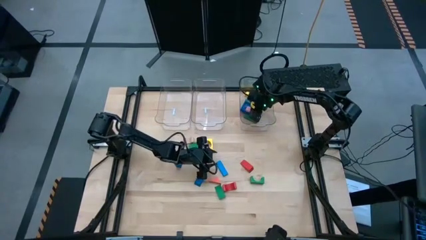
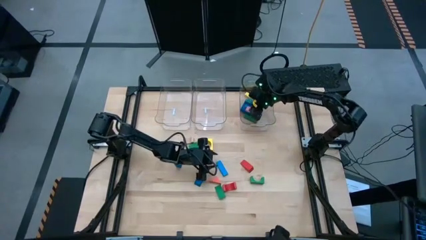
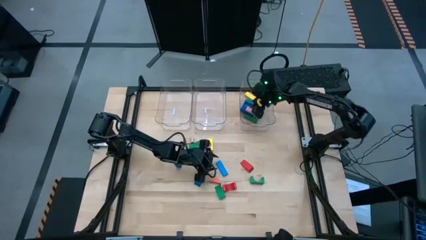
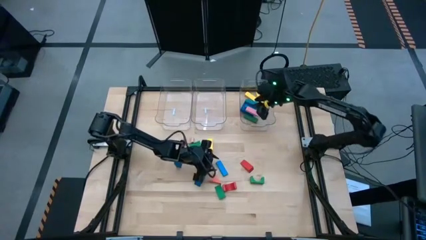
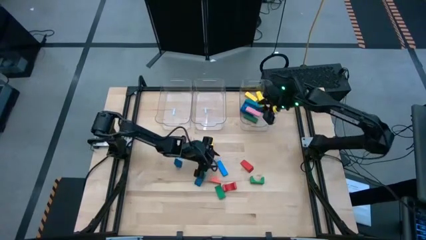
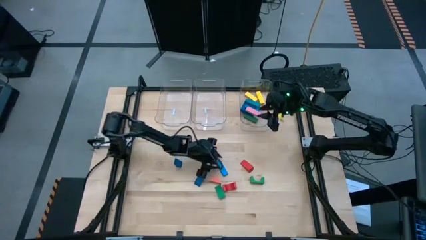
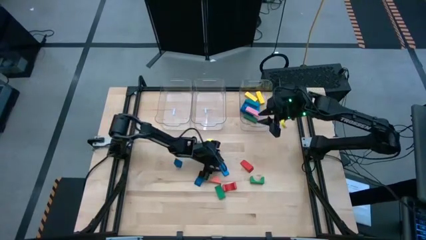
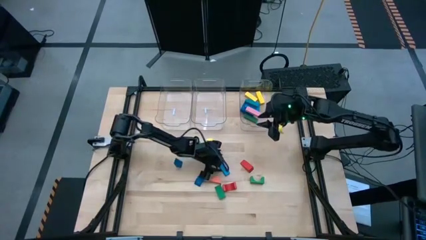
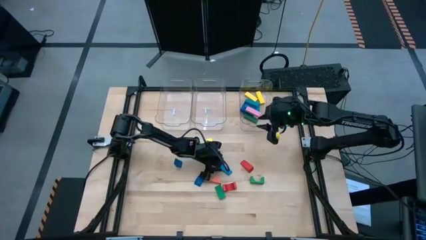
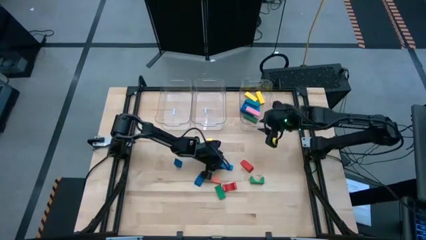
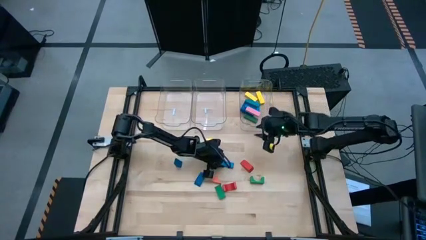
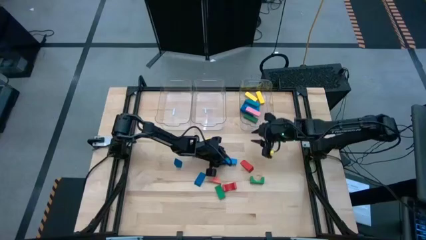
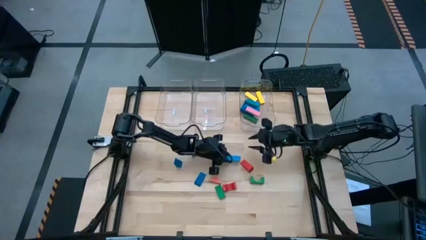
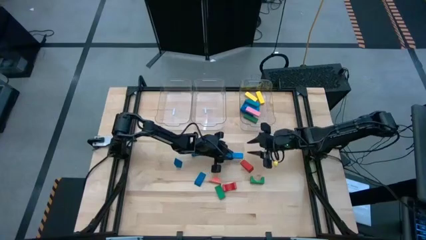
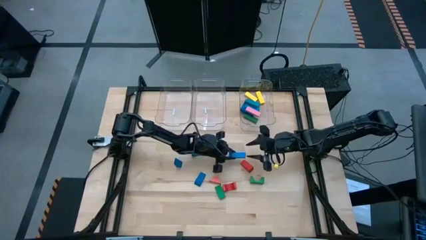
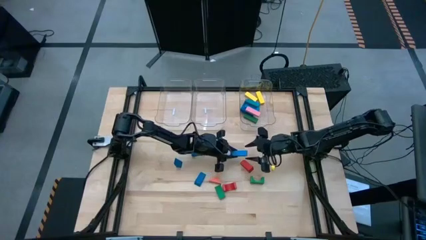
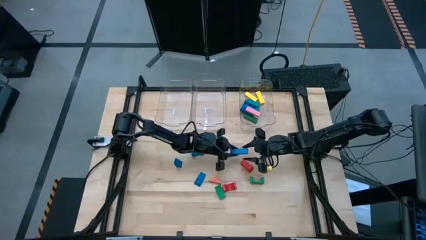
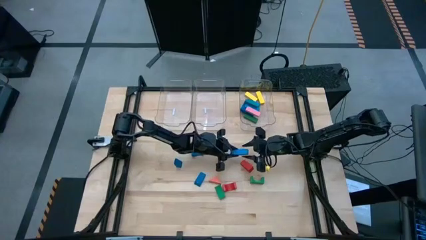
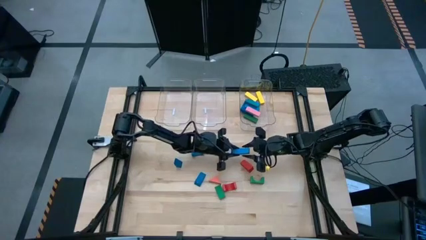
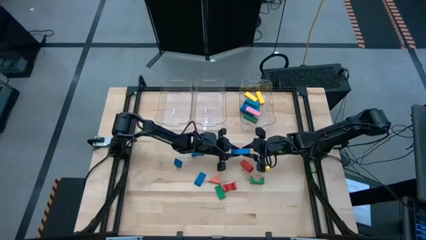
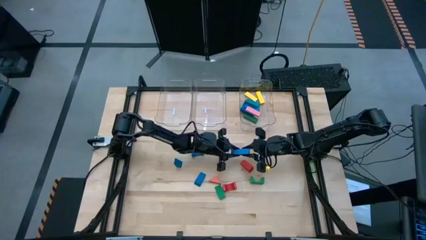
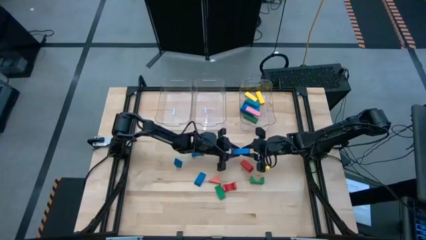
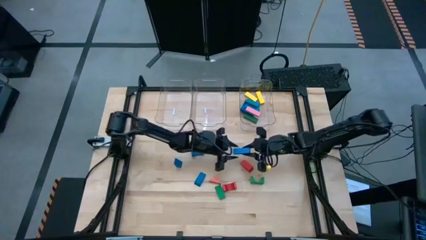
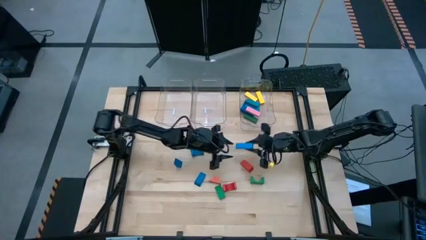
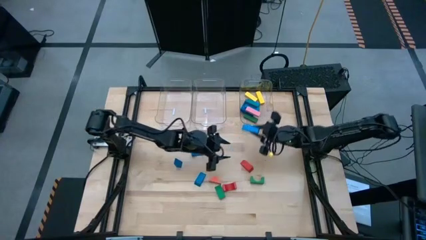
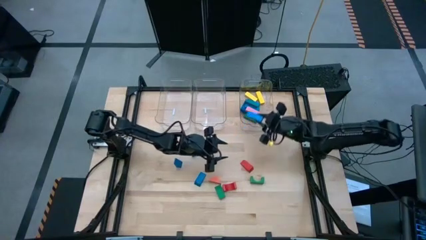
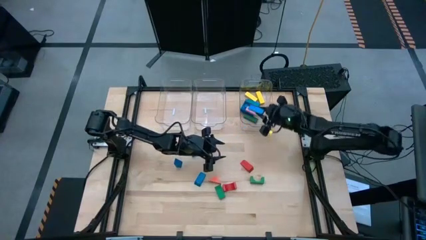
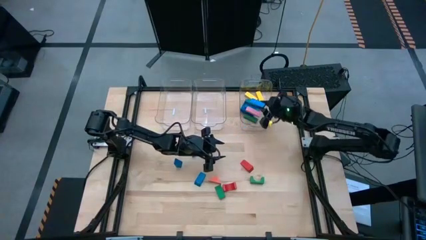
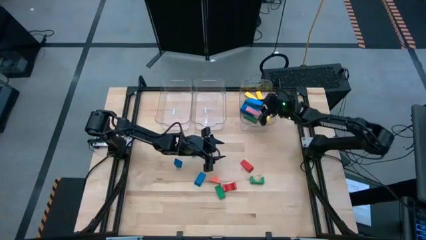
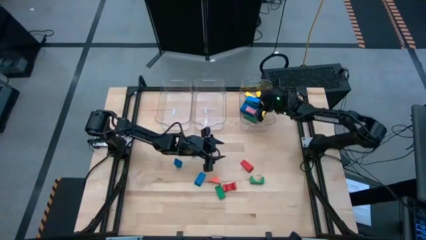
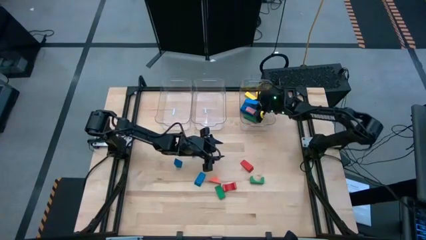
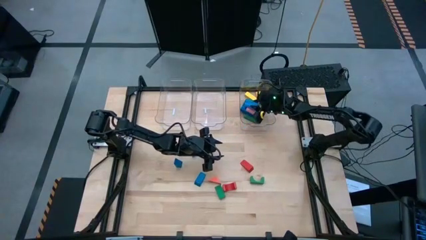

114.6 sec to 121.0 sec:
Task: Sort blocks by size
Put the blue rectangular block into the right transparent bin

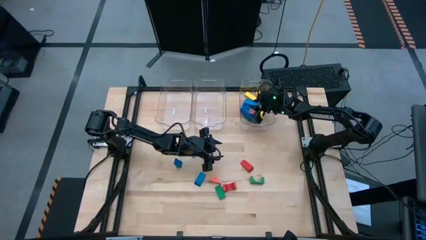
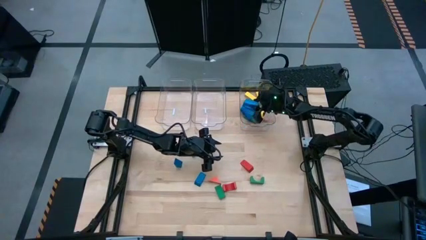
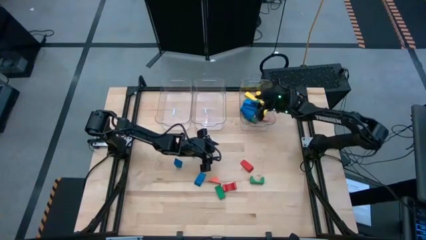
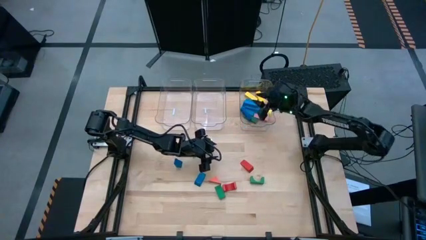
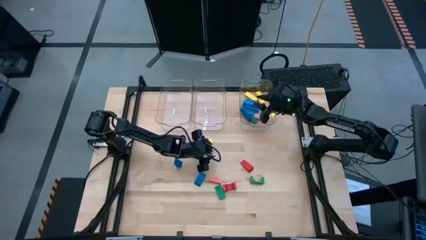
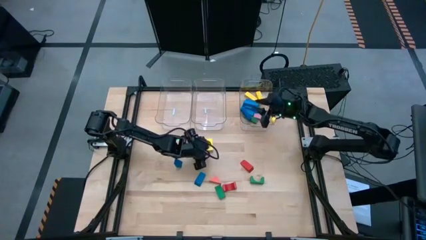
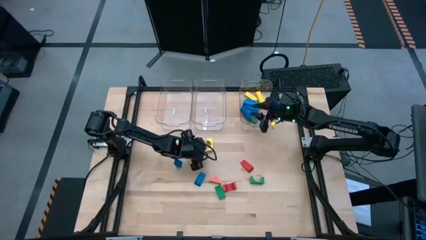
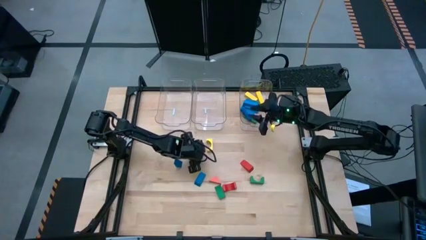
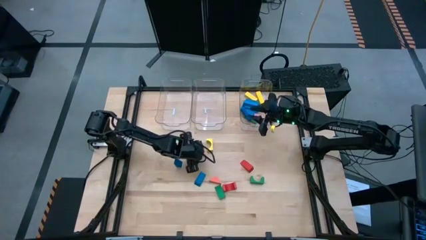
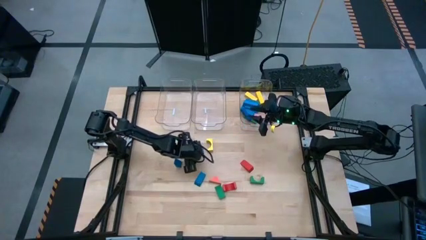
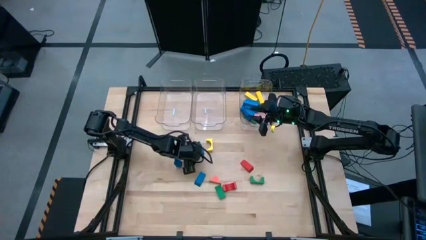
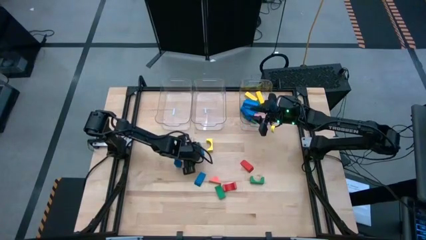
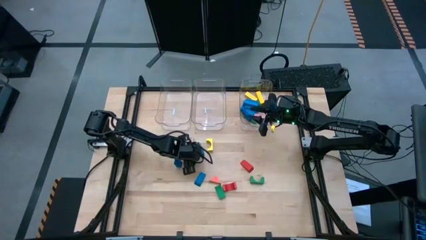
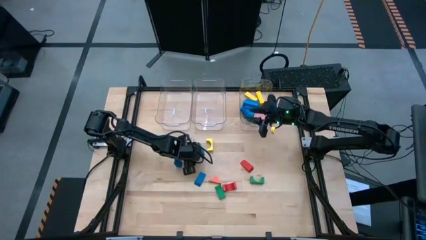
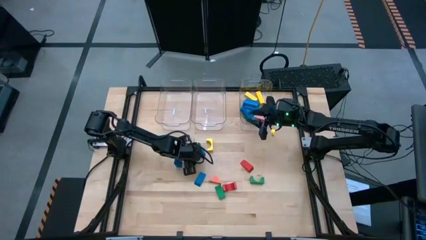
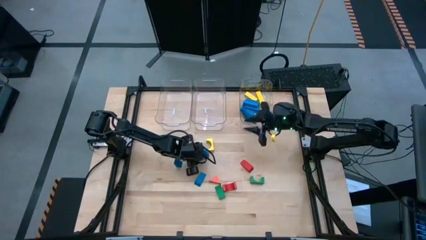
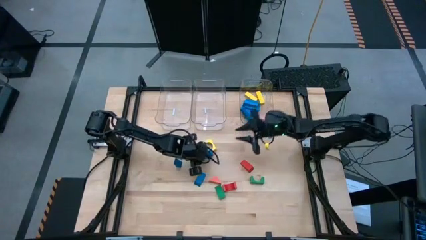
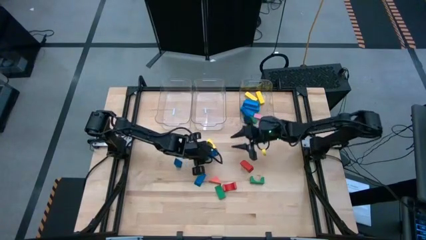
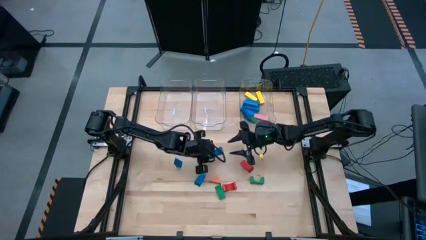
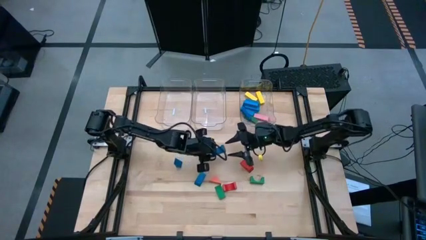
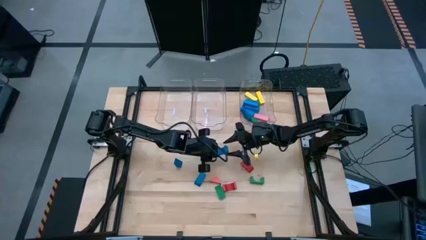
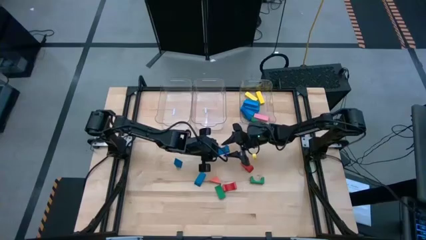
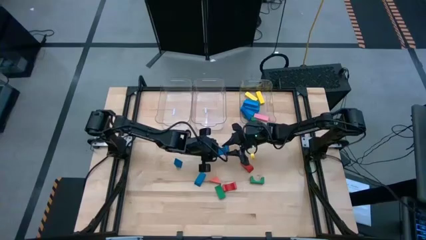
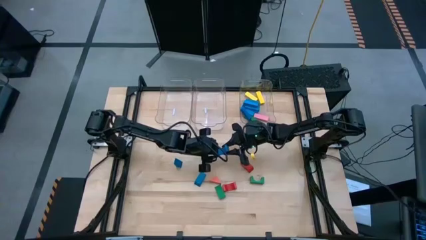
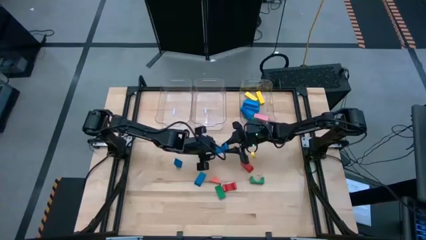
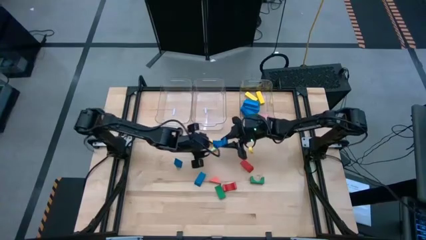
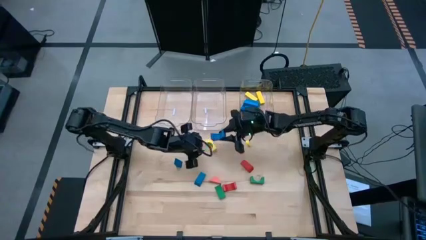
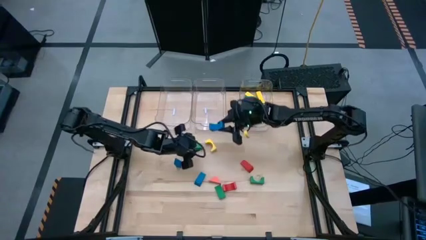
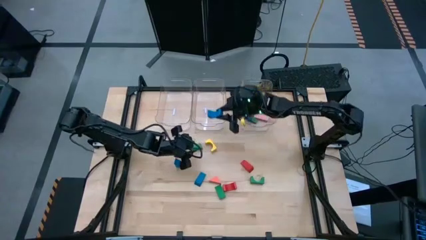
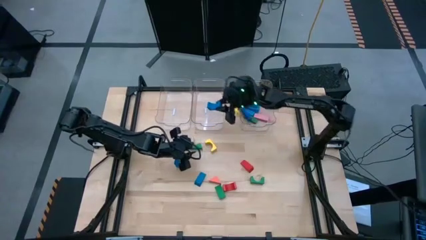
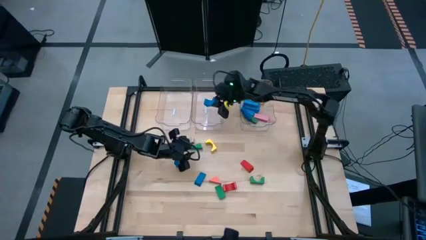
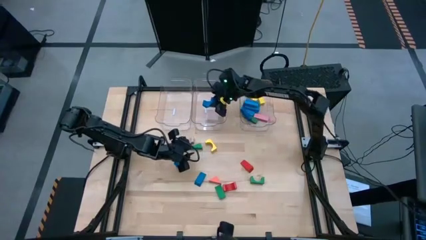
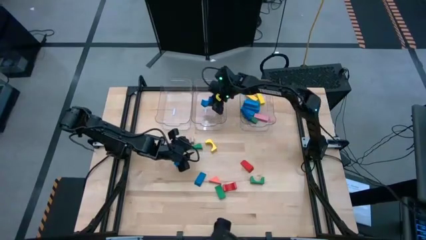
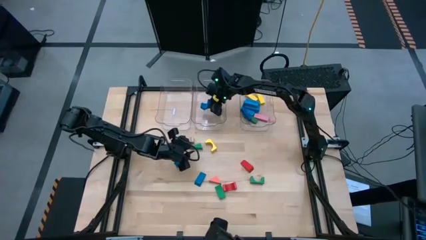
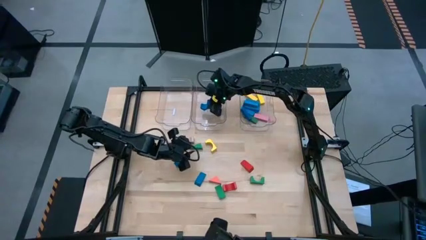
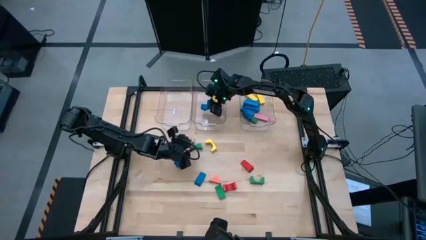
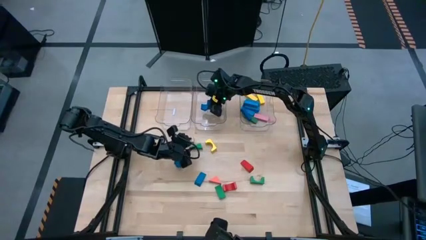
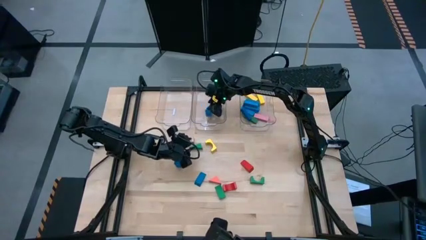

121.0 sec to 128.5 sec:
Put the blue arch block into the center transparent bin
